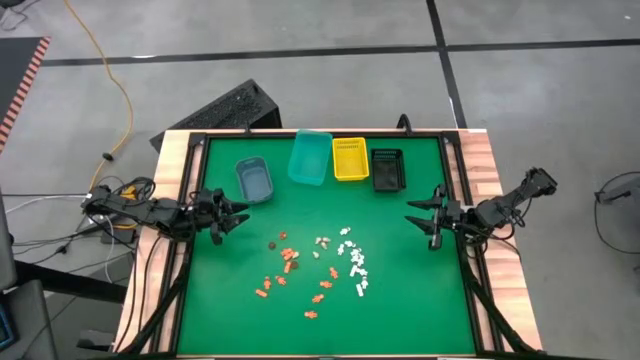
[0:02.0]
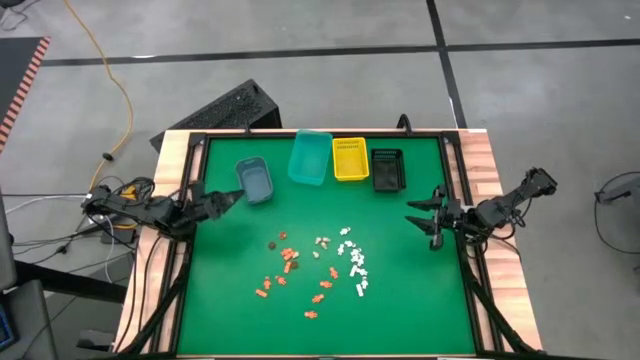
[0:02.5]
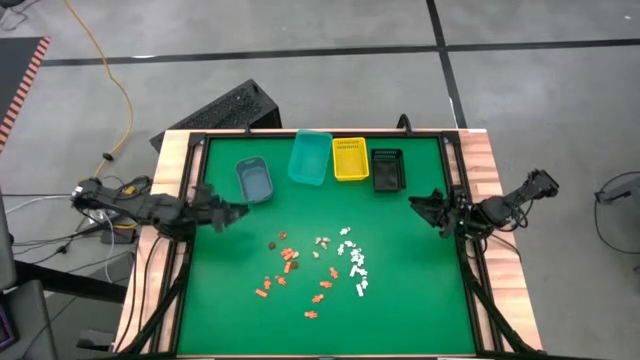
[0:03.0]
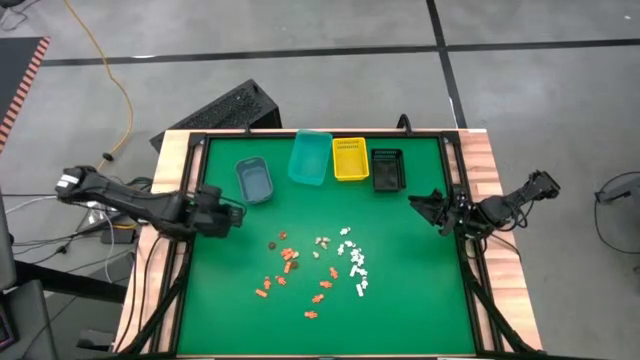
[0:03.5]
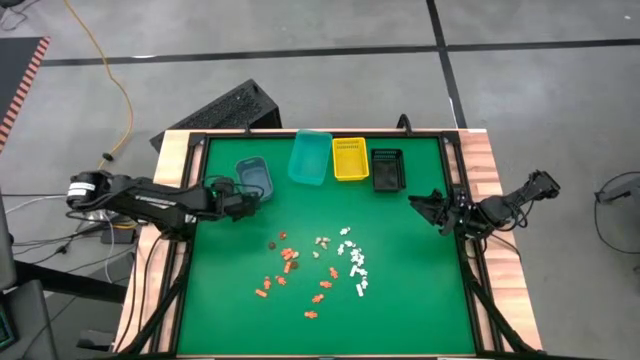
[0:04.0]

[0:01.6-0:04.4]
Task: Sort Halloween decoration
Adjust the blue bin

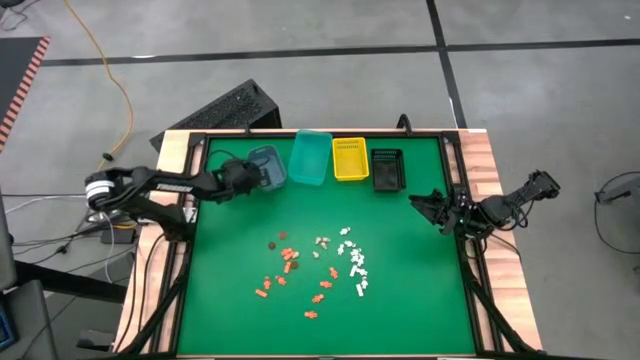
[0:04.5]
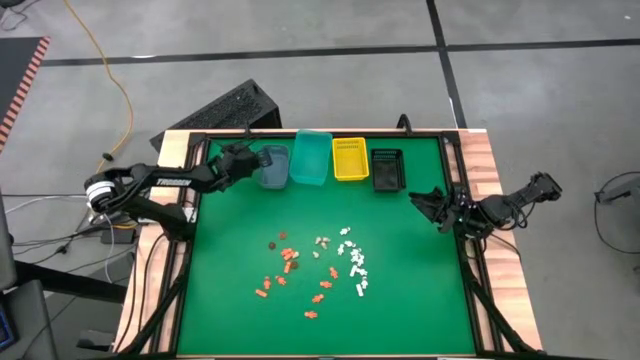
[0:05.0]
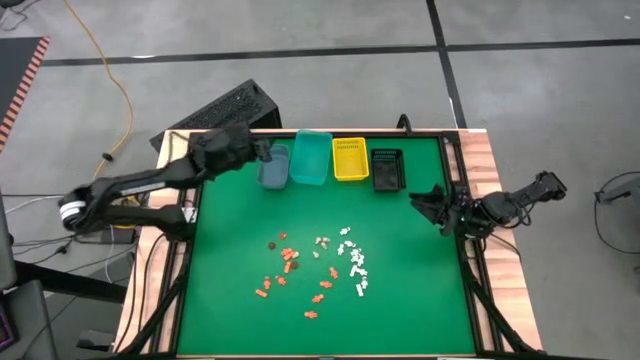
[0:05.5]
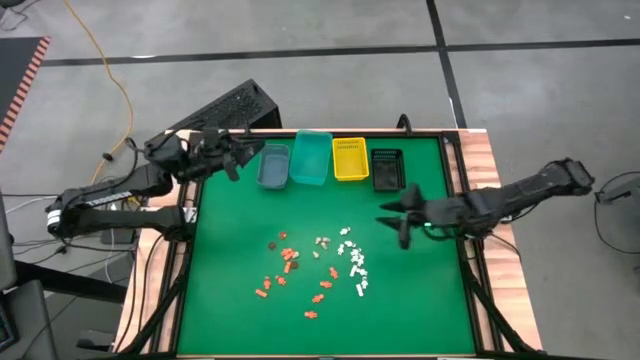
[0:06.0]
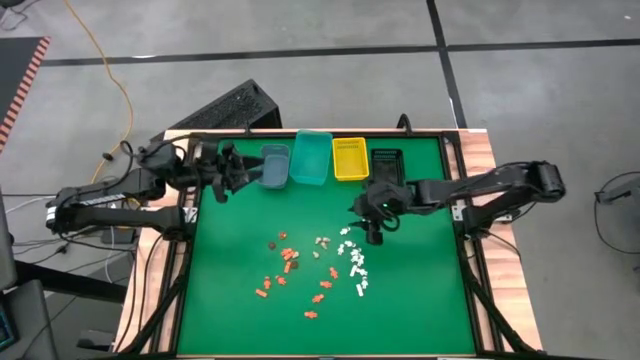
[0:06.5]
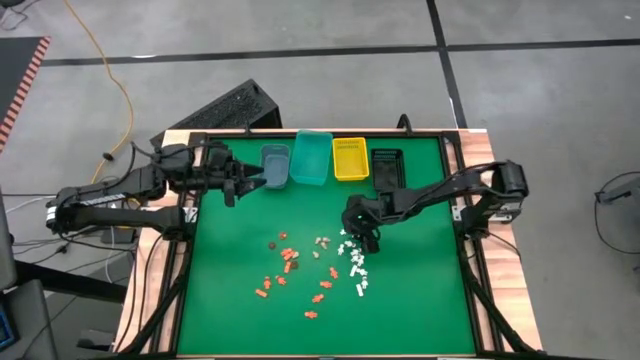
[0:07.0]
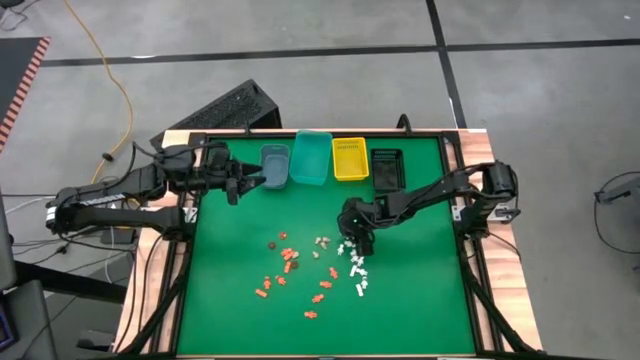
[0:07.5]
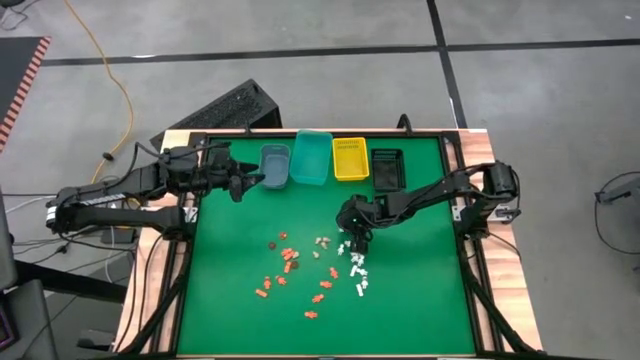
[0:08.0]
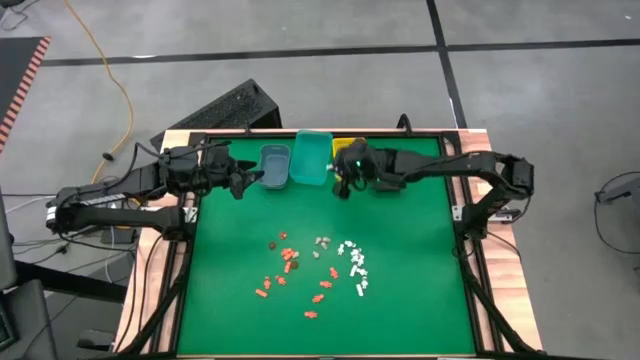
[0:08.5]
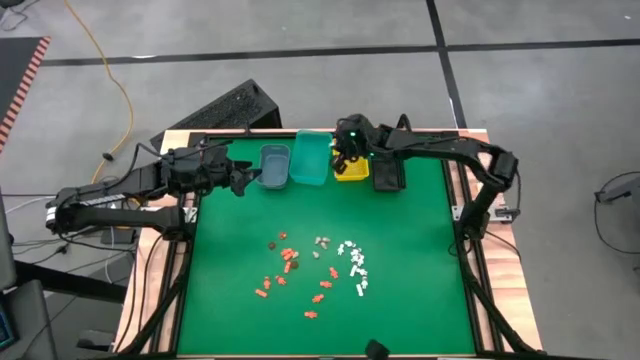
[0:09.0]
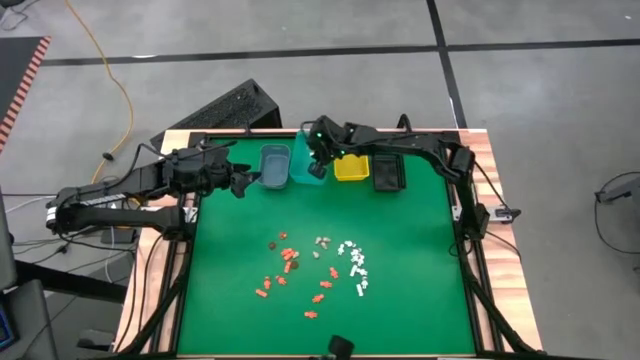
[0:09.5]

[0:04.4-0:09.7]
Put the white skeleton toy into the blue transparent bin

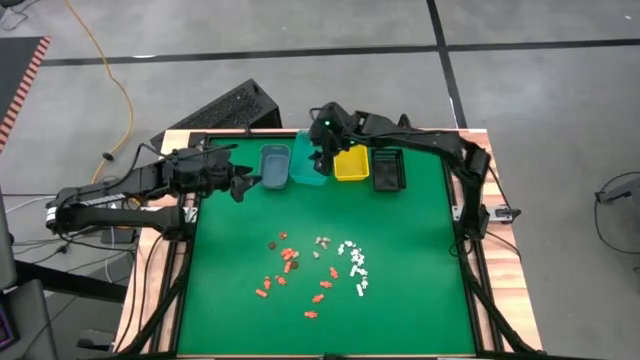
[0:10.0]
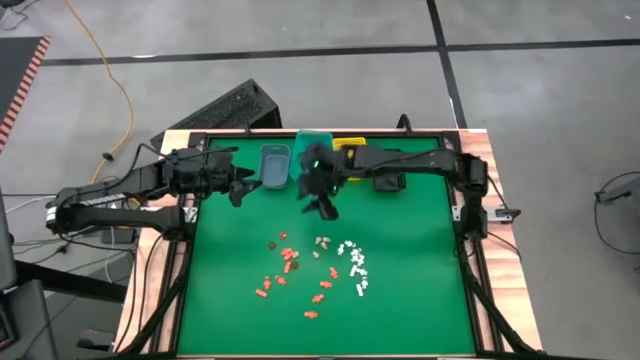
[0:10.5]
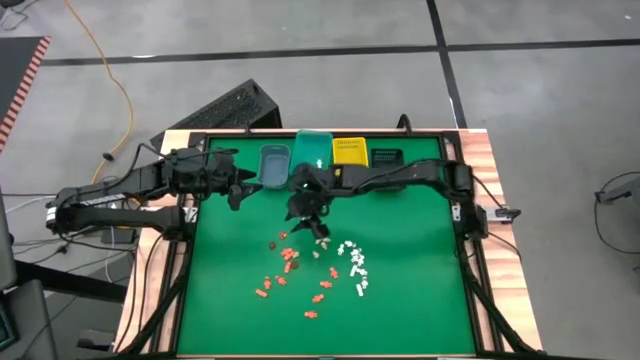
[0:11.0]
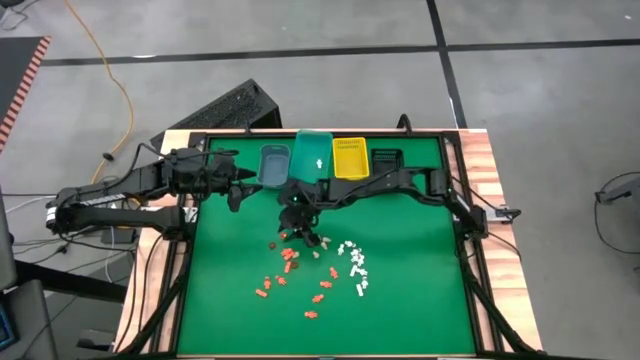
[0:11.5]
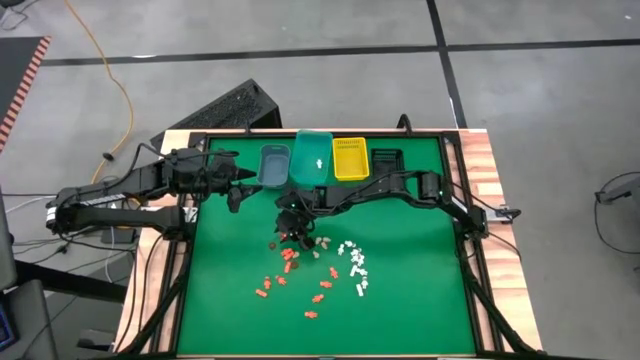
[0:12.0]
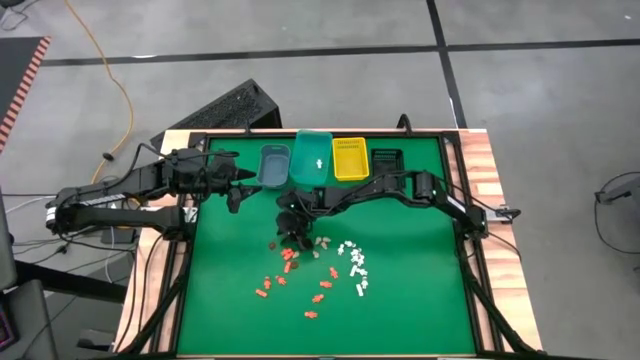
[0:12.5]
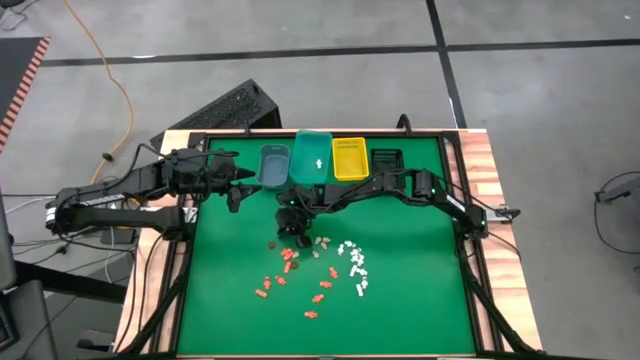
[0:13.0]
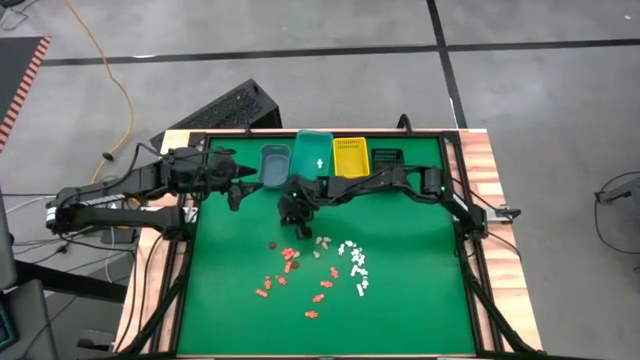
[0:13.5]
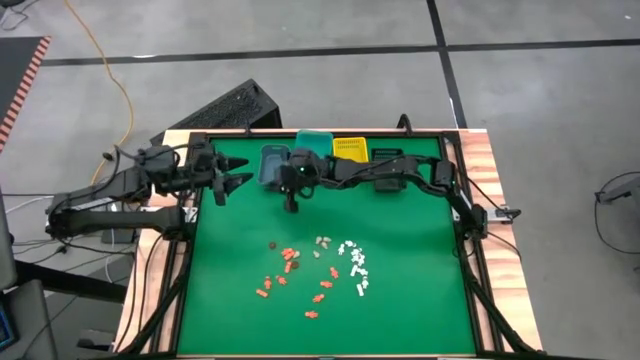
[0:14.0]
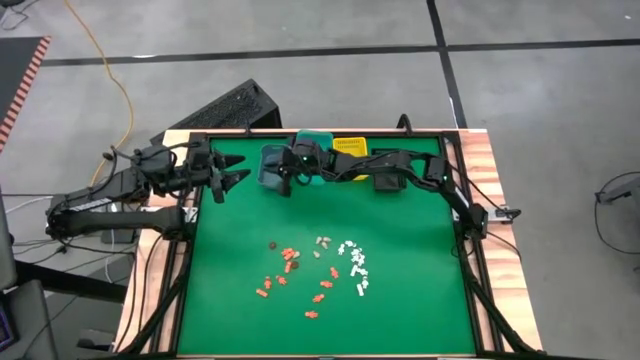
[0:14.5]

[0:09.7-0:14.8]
Put the orange pumpkin toy into the blue bin

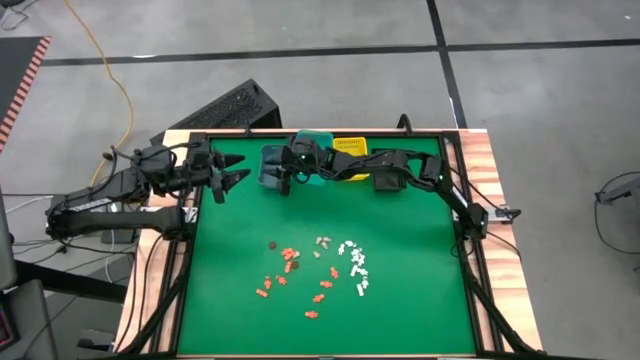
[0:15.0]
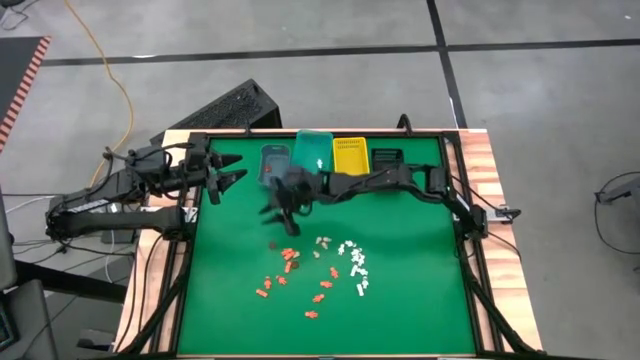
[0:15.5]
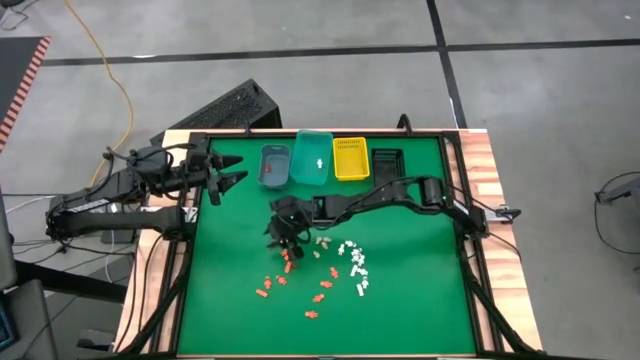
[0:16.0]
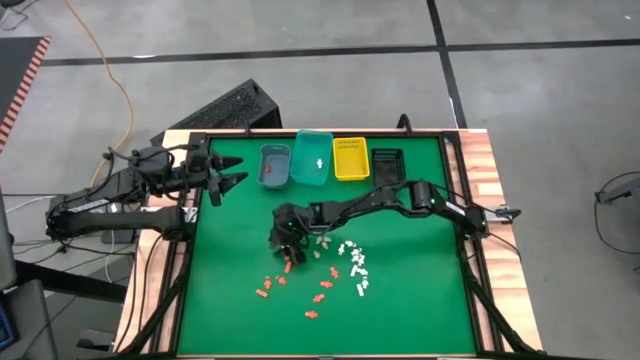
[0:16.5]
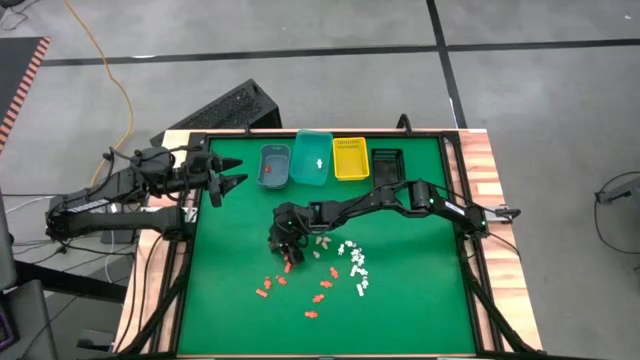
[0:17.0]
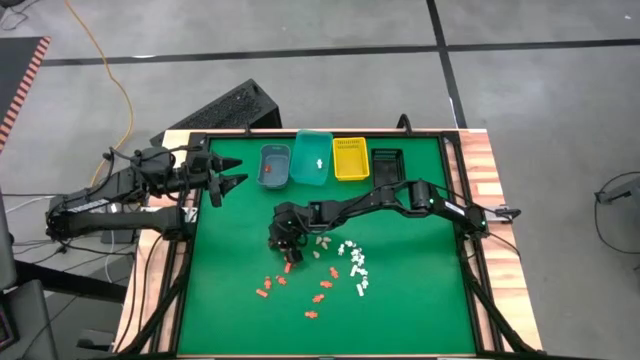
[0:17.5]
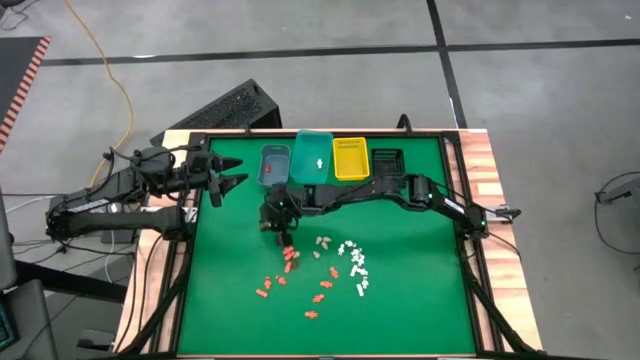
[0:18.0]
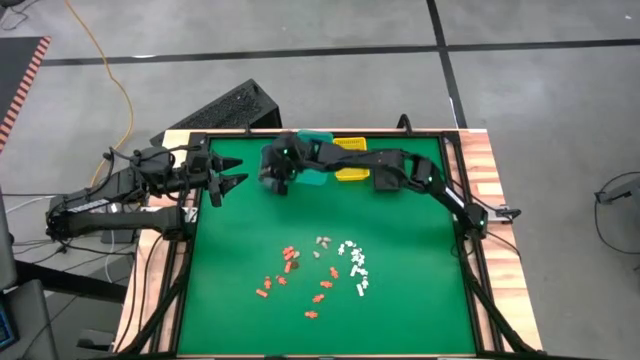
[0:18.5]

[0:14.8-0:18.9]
Put the orange pumpkin toy into the blue bin

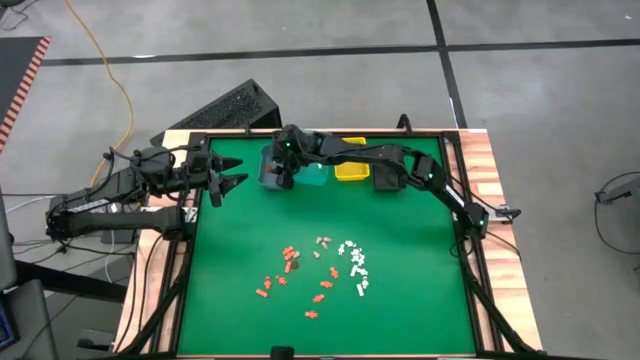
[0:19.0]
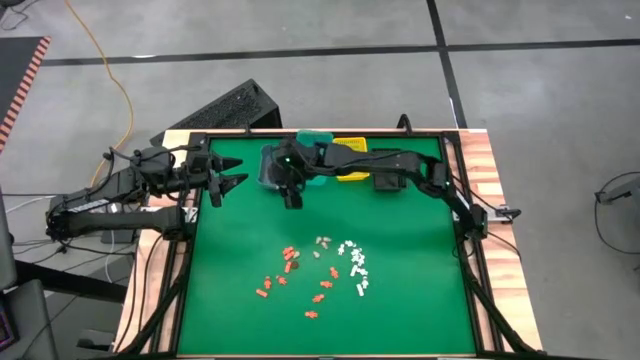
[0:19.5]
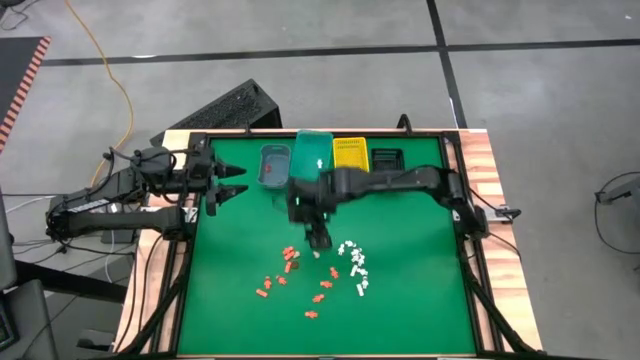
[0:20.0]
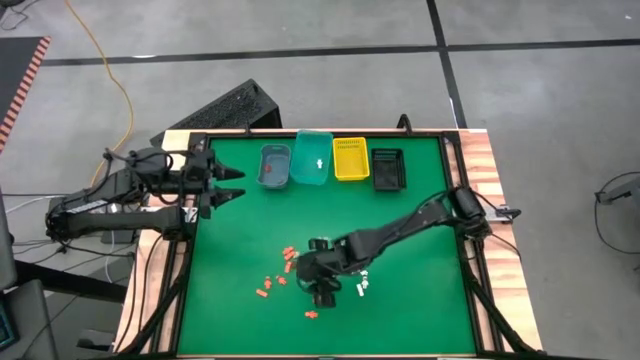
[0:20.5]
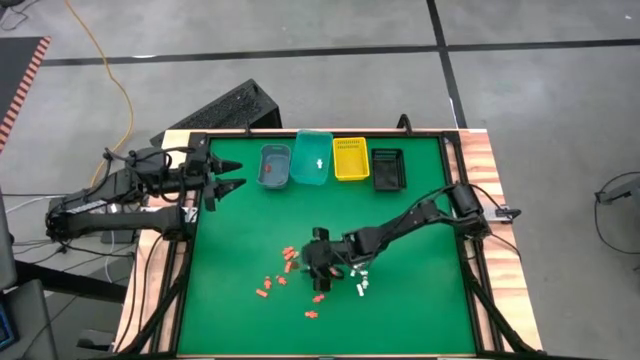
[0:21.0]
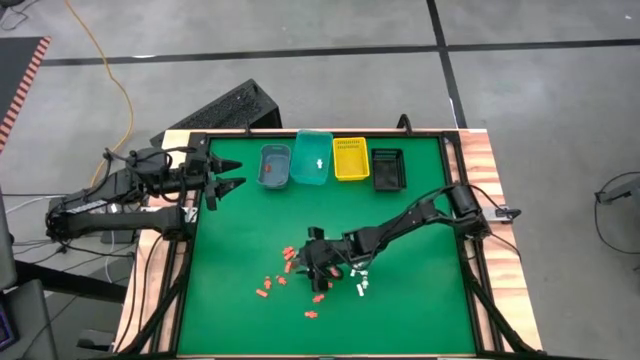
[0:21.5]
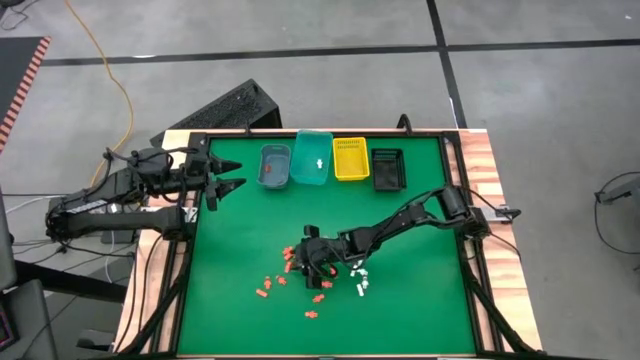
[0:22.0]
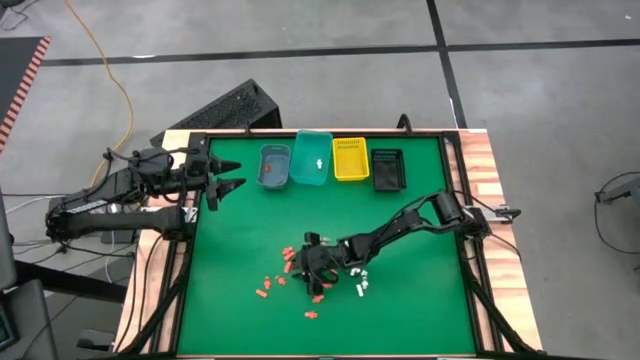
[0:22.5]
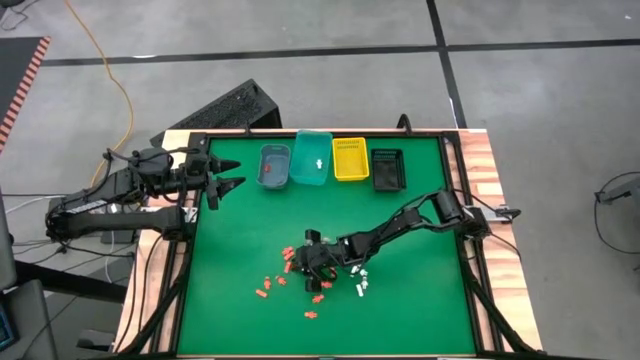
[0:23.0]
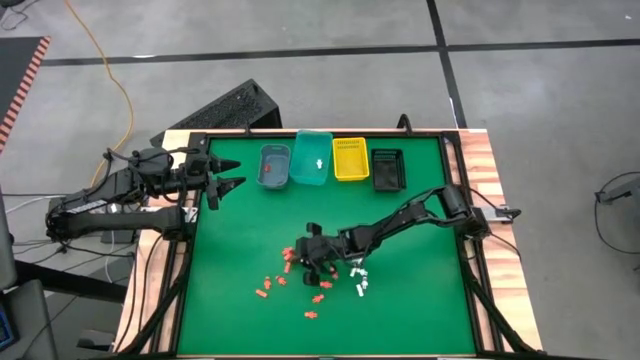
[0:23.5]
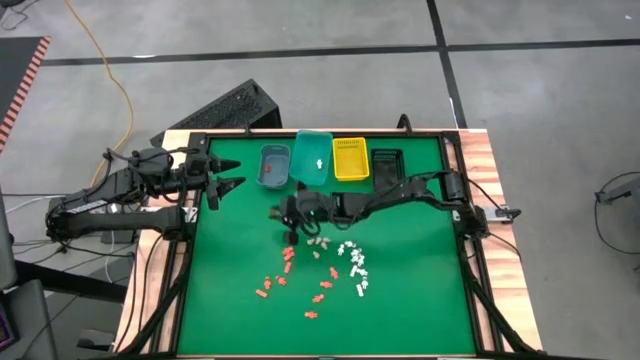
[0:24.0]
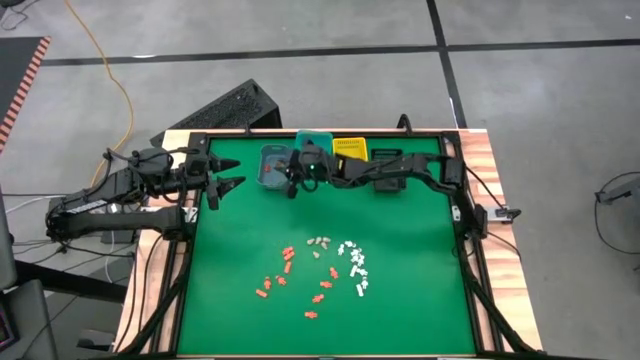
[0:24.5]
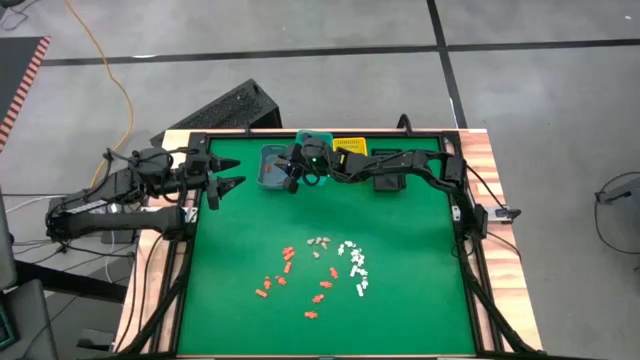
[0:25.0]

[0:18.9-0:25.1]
Put the orange pumpkin toy into the blue bin
